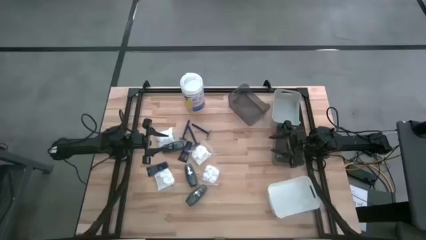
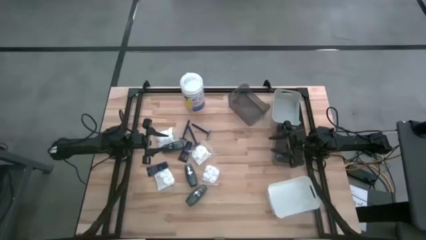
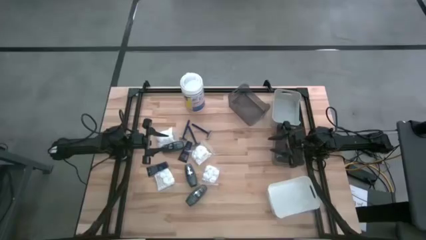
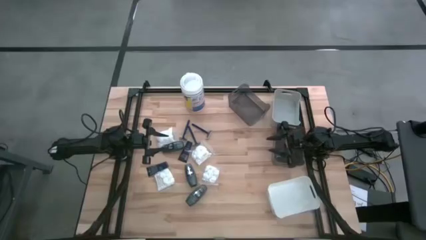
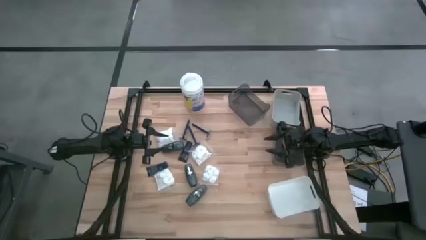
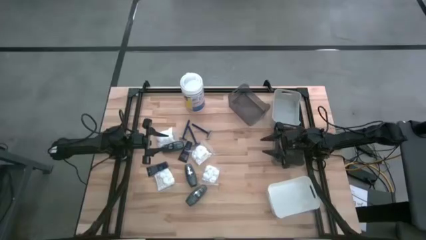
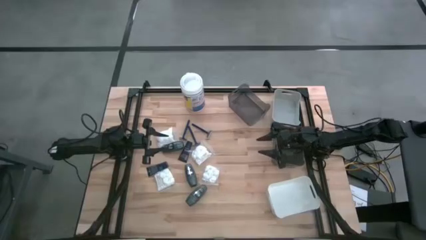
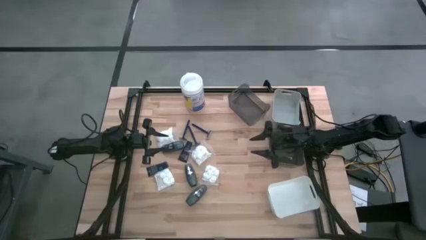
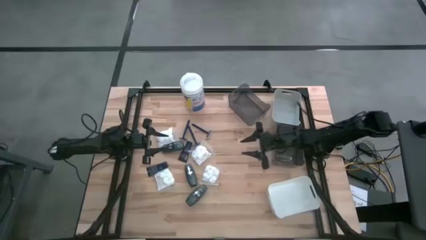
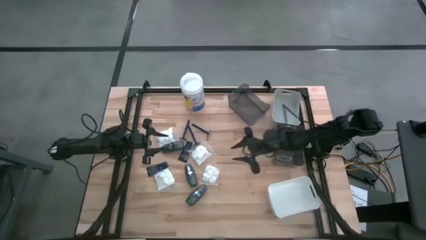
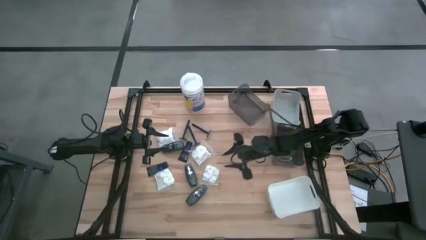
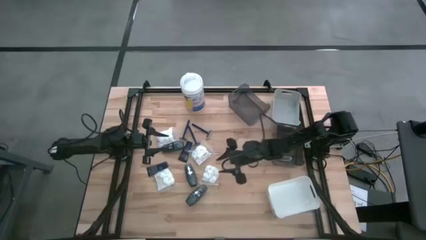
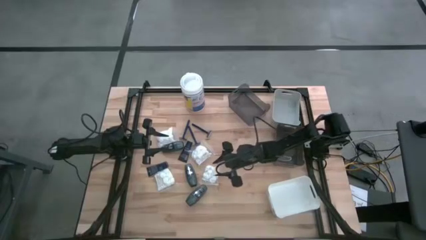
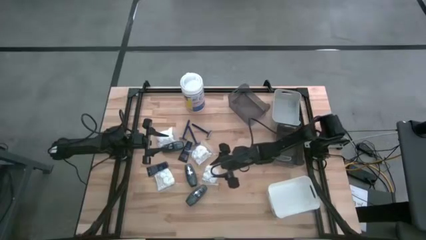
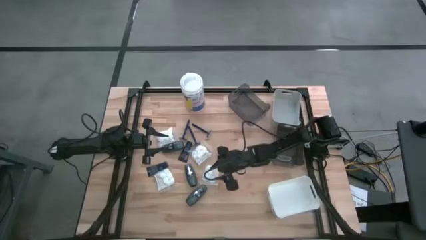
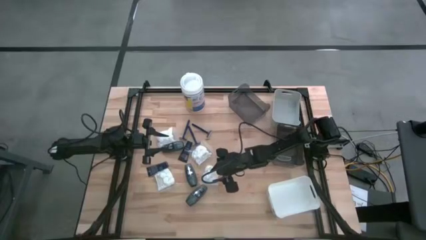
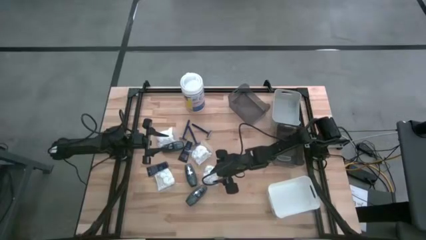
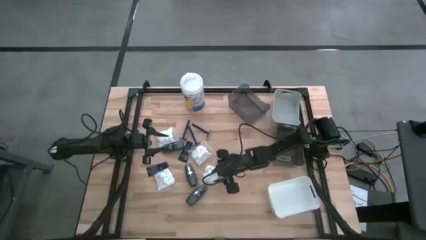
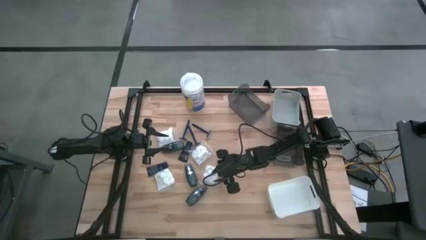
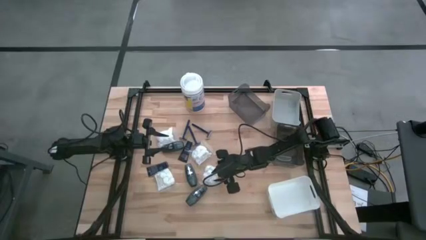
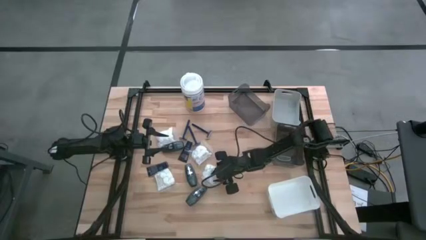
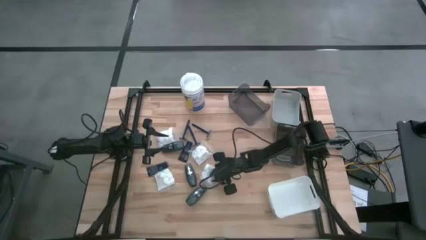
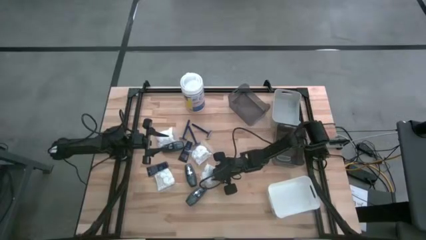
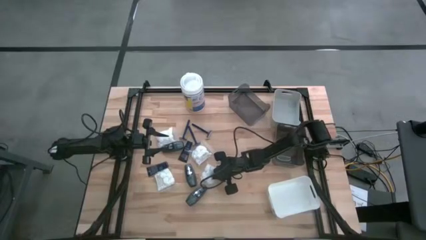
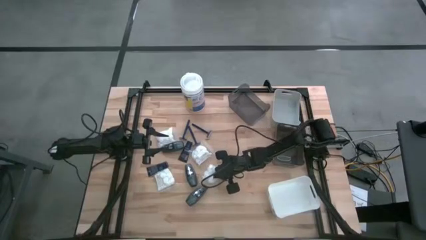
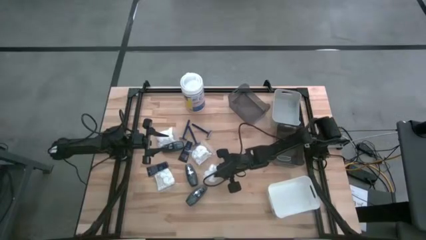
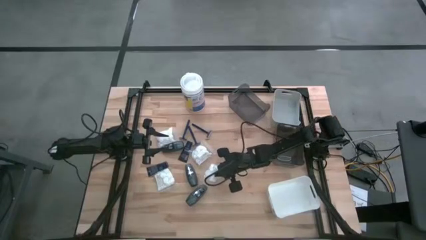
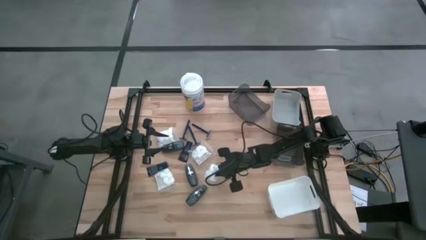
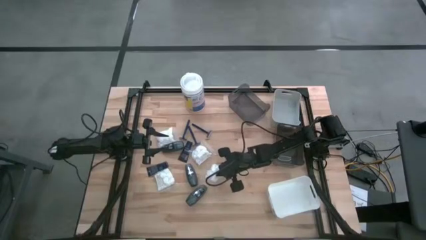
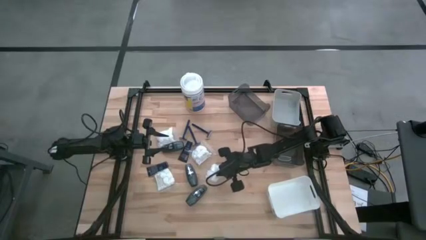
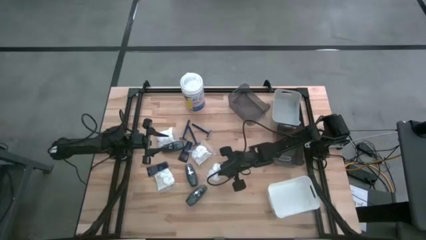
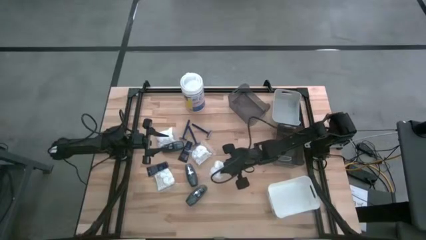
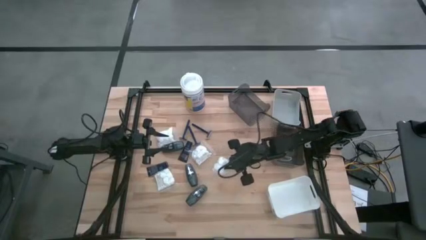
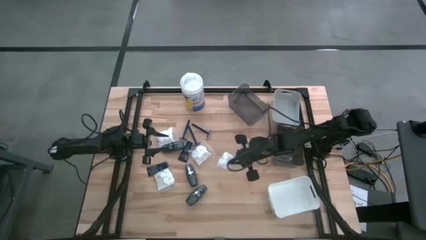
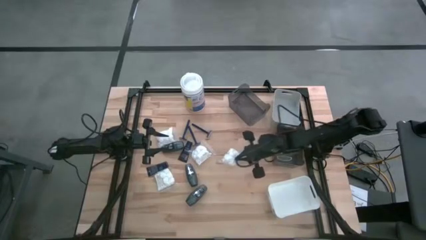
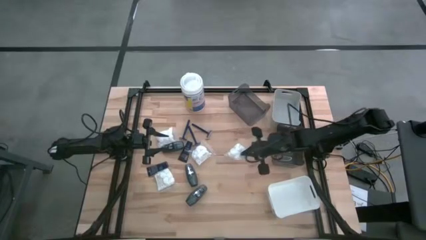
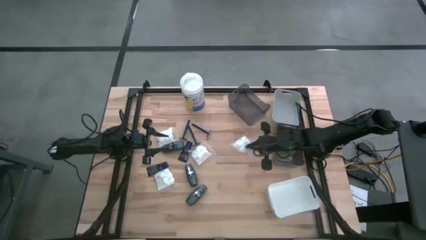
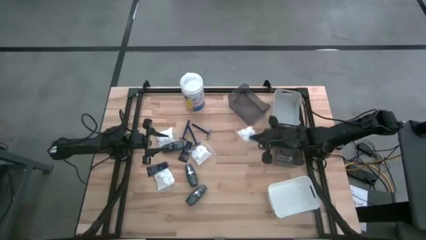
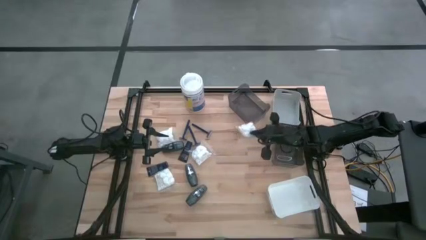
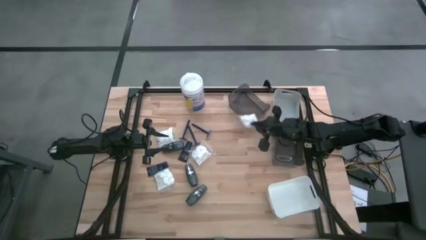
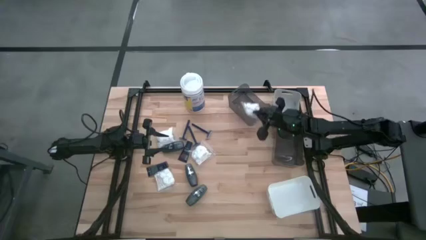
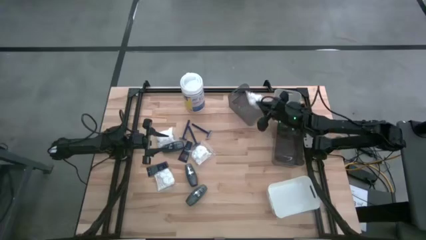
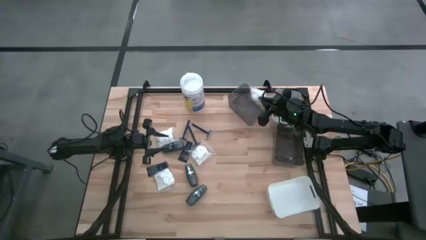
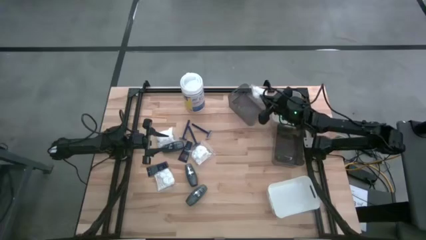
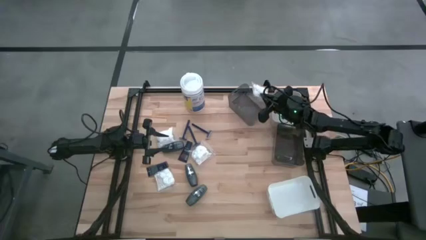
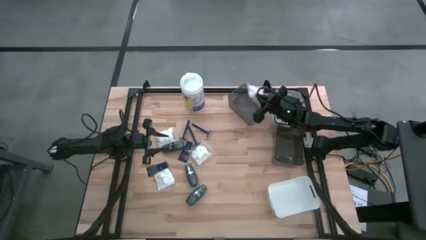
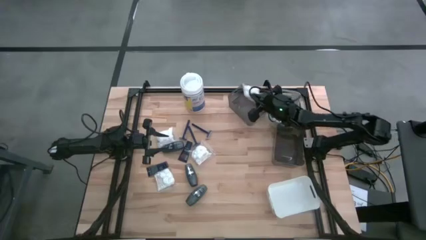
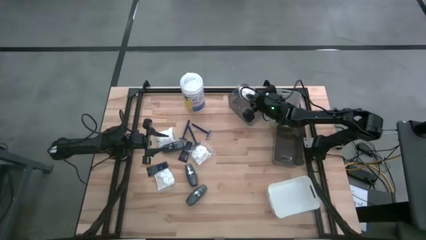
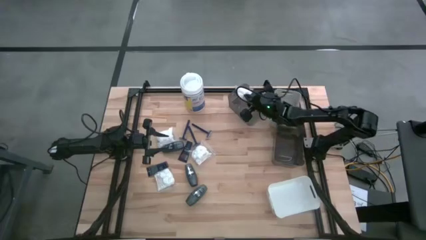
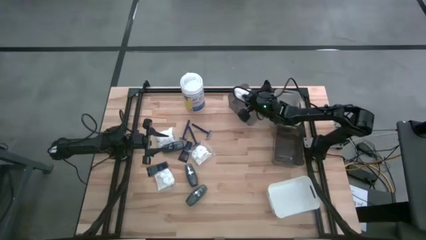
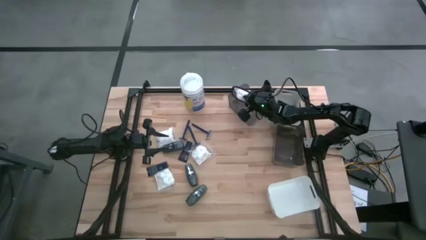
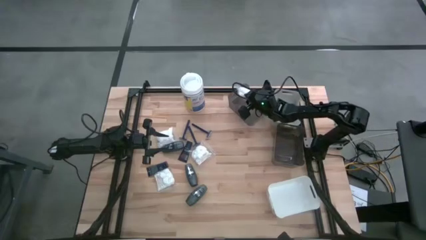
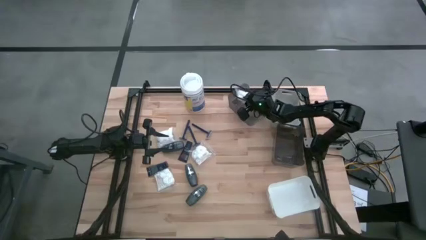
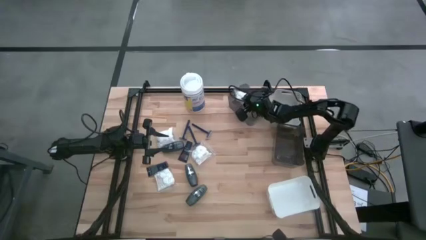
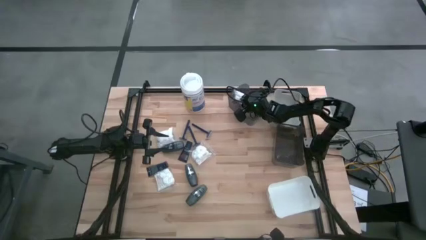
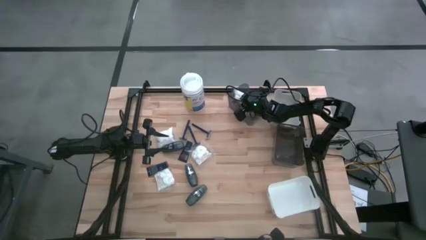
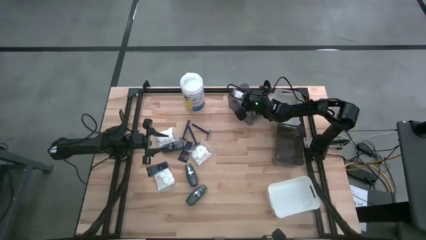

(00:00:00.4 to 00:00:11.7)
Task: Pick & Place Travel size toiletries
Put the white cotton pack into the top black bin
